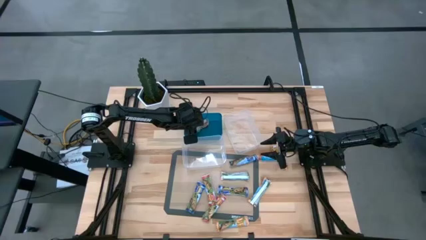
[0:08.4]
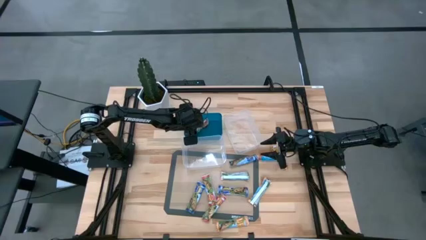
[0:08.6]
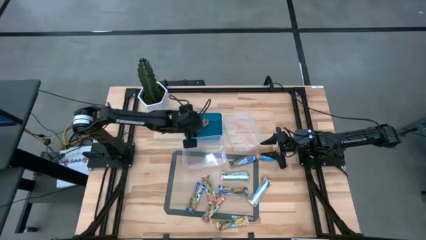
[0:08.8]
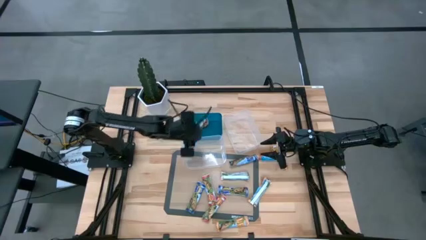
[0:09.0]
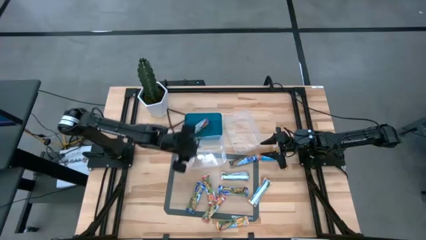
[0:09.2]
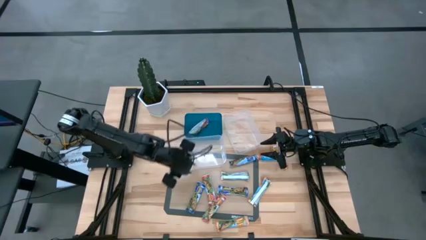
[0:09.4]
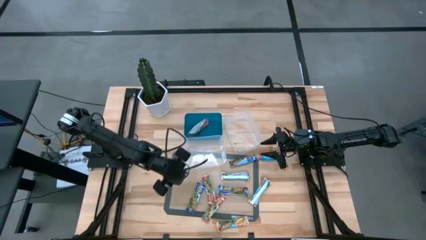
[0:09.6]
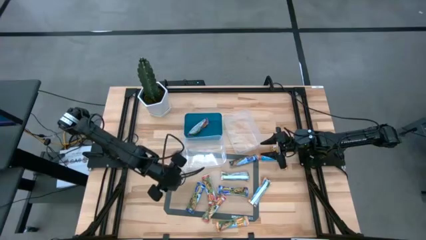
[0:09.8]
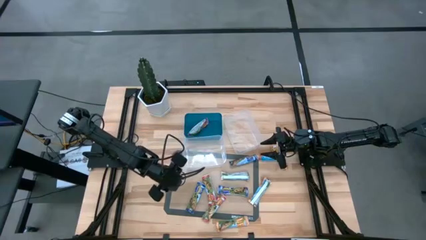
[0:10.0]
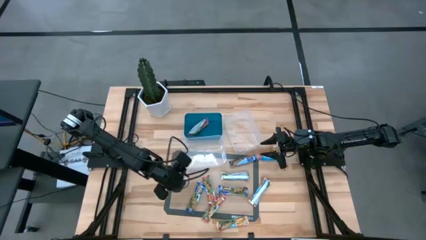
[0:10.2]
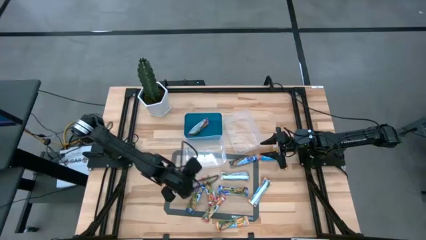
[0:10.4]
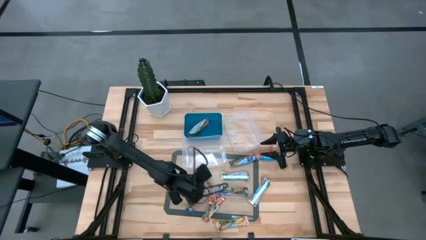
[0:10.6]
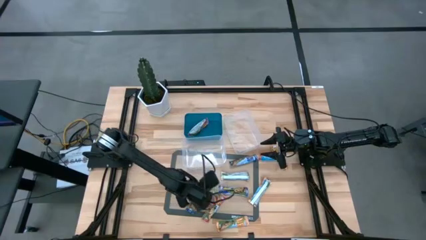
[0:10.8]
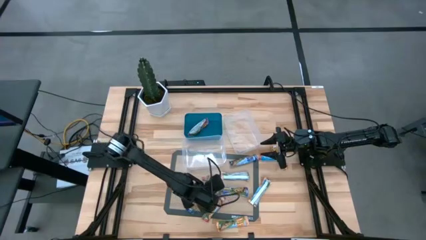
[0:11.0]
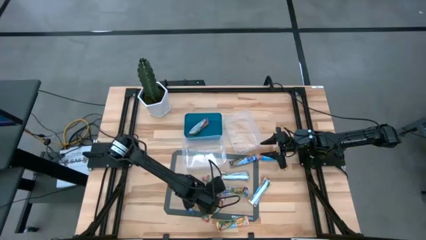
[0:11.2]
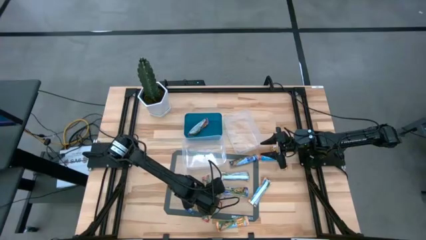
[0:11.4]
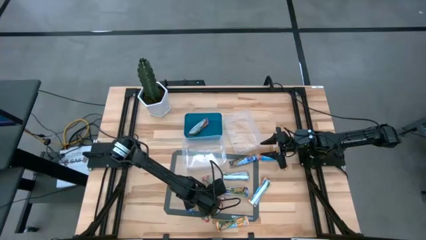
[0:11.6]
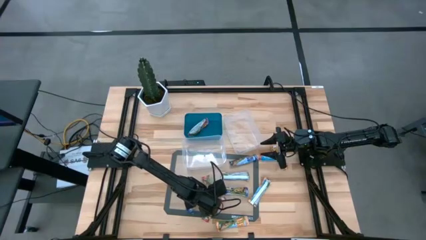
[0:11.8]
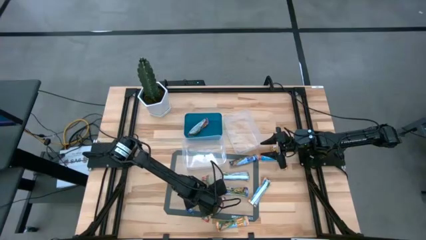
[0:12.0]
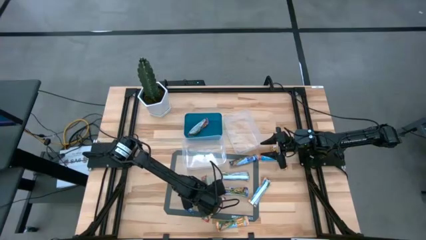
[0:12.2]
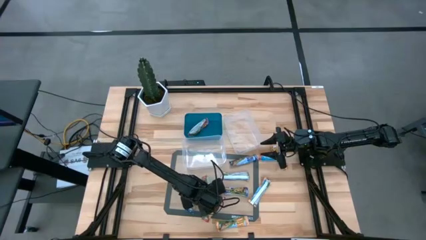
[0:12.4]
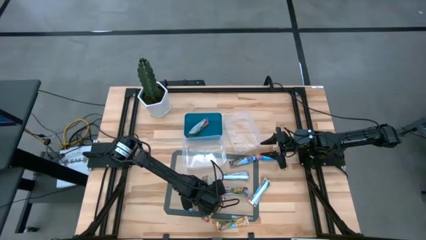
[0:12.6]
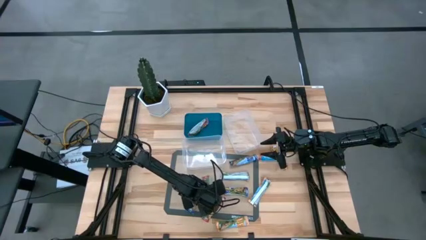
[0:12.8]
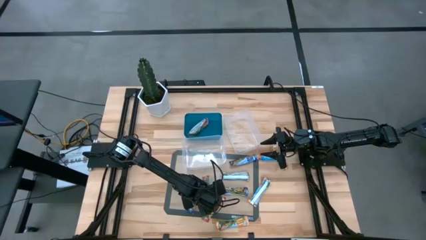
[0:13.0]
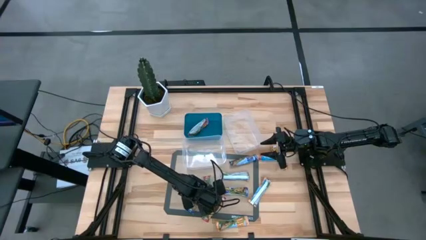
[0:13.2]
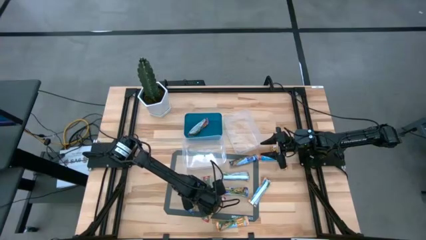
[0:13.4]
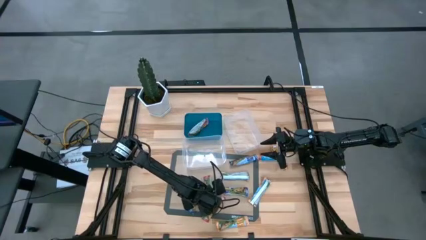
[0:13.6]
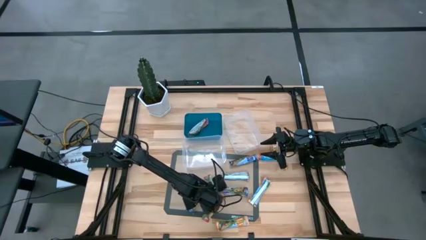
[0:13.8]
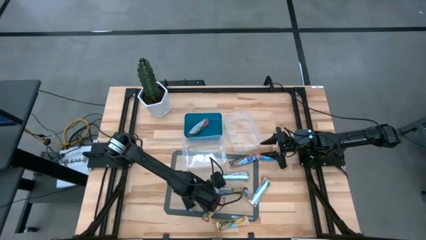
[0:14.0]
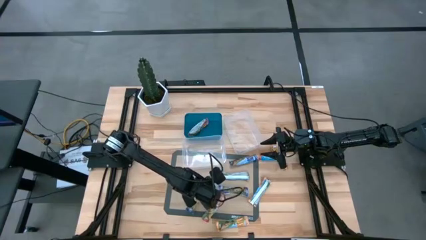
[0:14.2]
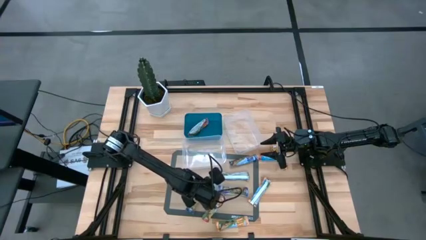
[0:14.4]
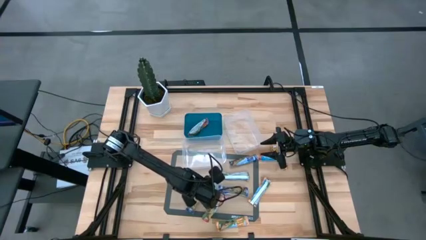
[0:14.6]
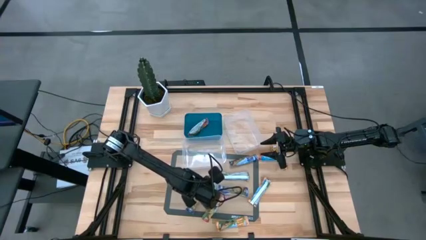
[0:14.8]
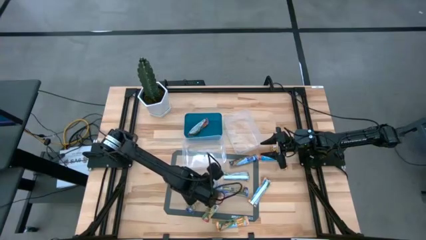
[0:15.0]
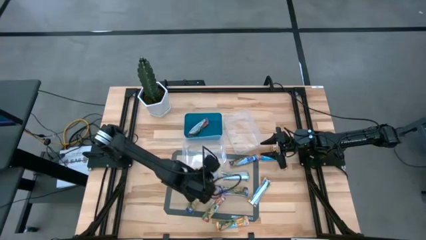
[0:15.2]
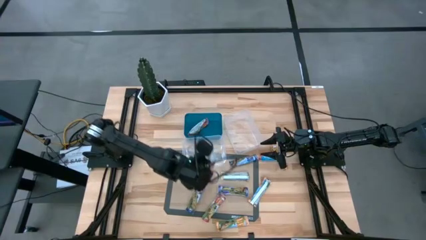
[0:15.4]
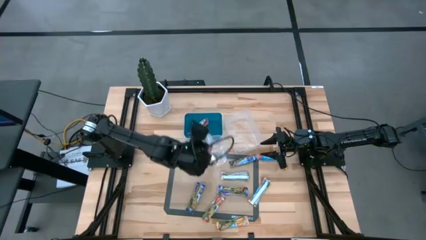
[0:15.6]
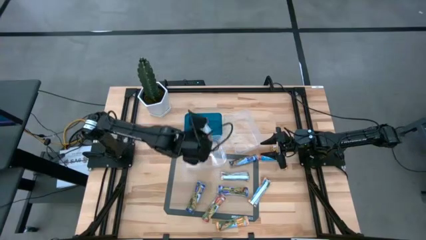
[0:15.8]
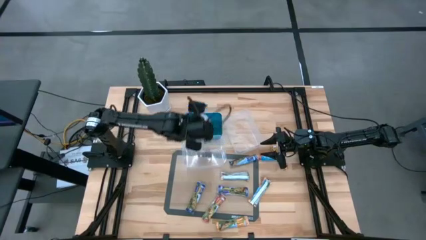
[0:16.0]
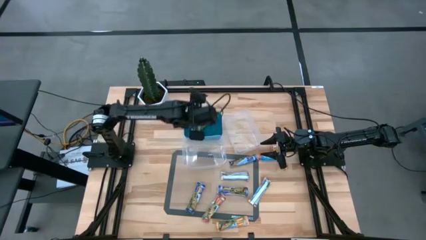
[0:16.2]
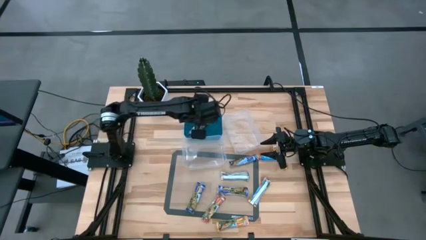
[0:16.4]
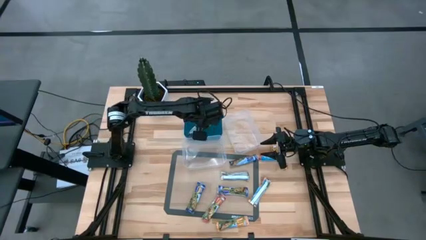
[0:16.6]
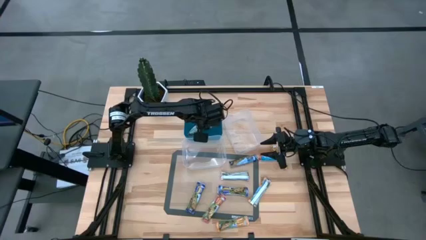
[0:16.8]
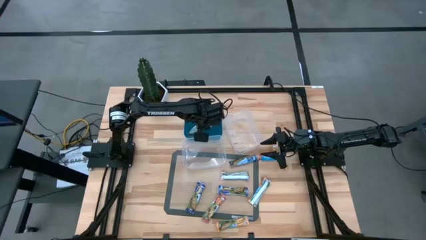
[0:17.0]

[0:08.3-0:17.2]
Task: Pick and place Granola Bars by type
Put the red granola bar into the blue bin

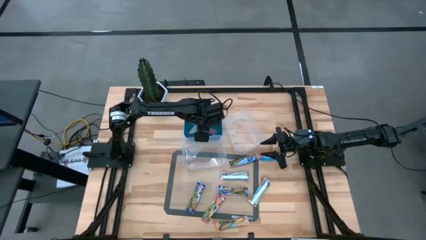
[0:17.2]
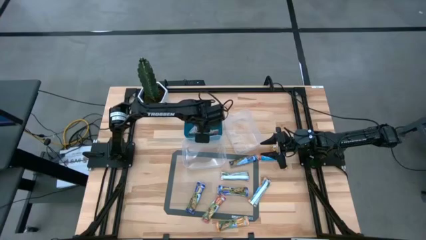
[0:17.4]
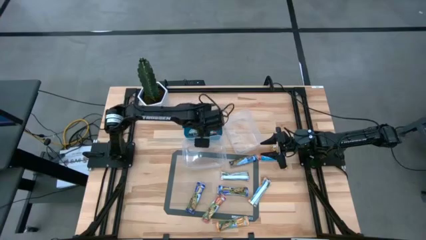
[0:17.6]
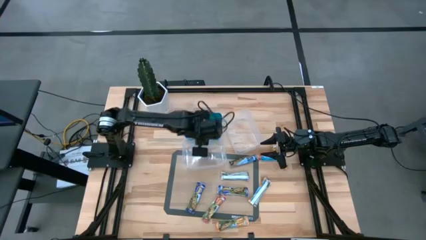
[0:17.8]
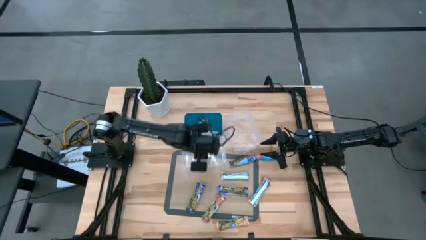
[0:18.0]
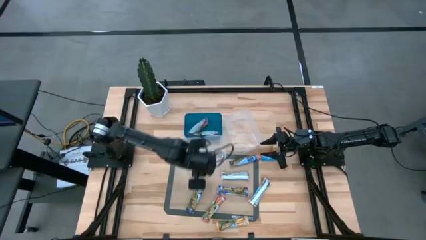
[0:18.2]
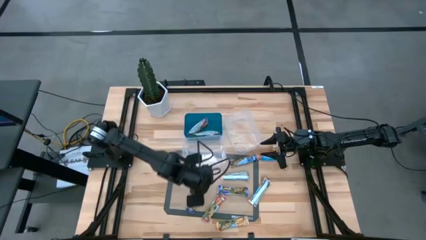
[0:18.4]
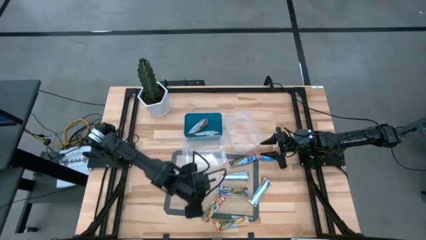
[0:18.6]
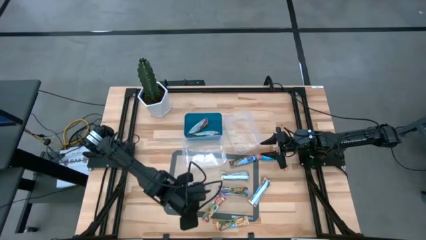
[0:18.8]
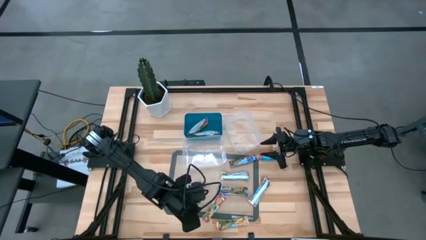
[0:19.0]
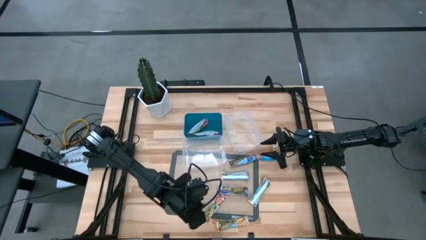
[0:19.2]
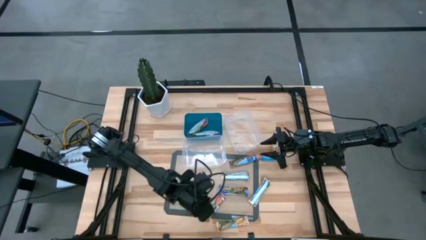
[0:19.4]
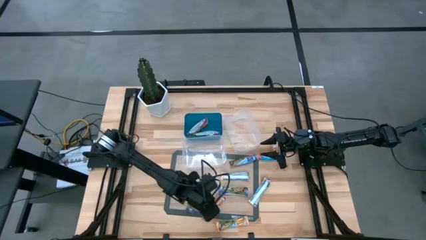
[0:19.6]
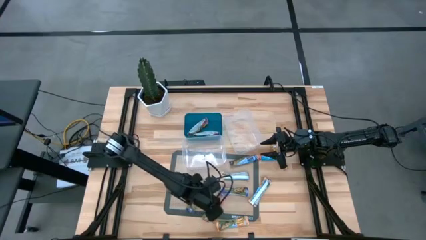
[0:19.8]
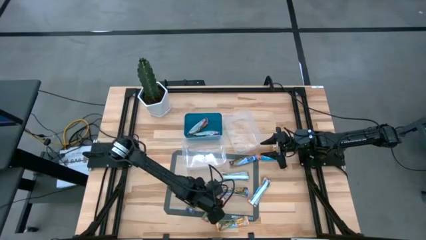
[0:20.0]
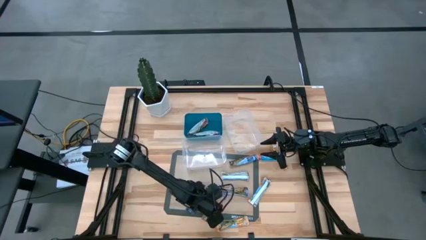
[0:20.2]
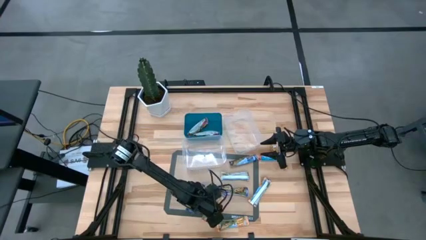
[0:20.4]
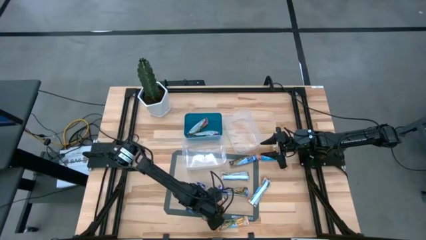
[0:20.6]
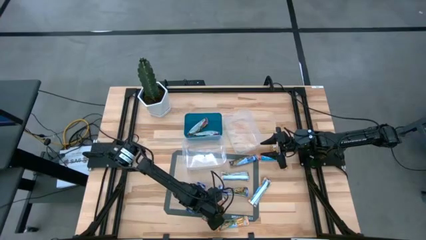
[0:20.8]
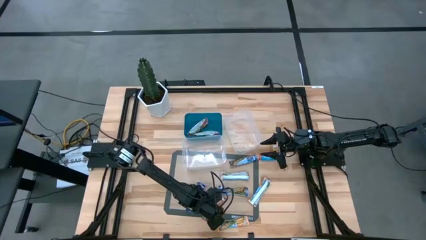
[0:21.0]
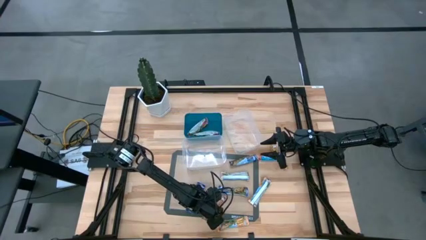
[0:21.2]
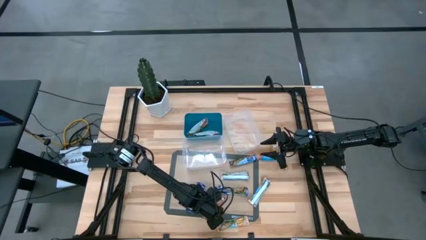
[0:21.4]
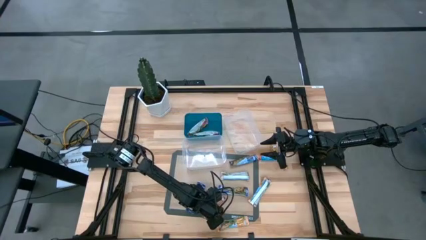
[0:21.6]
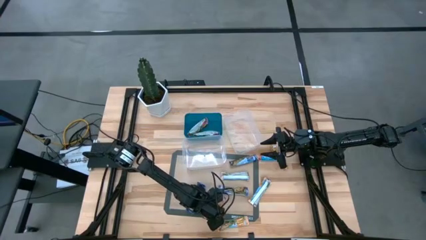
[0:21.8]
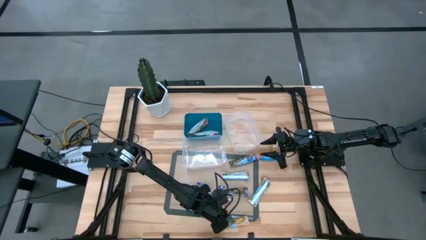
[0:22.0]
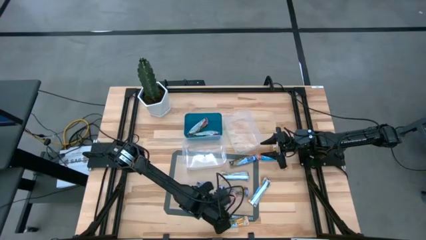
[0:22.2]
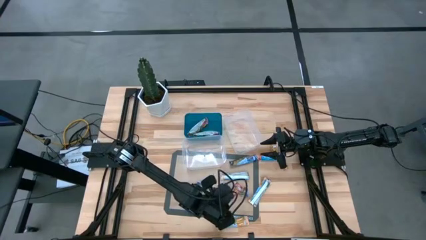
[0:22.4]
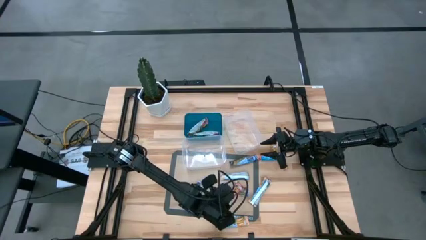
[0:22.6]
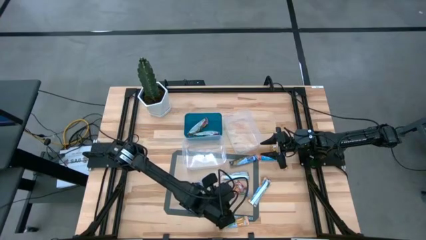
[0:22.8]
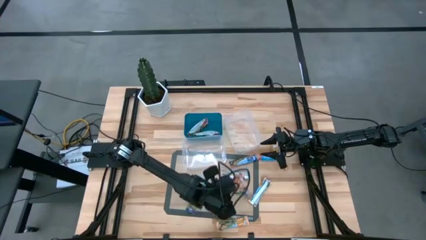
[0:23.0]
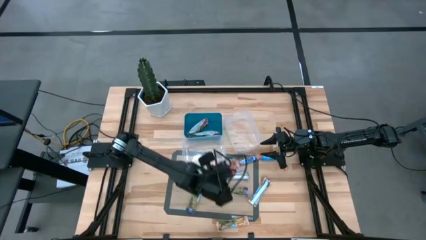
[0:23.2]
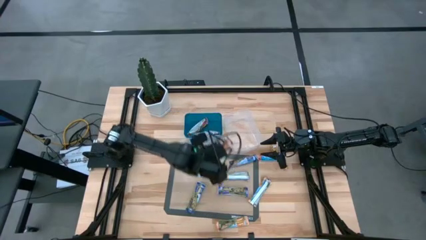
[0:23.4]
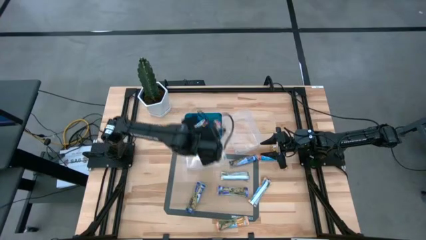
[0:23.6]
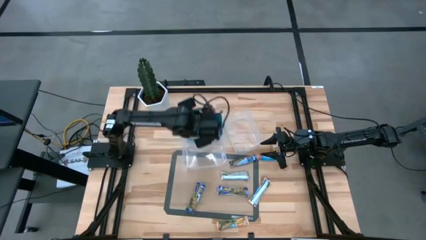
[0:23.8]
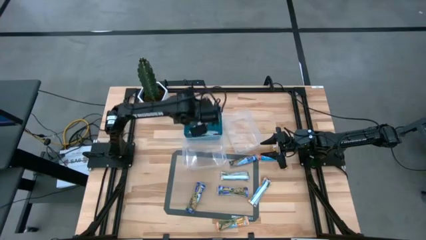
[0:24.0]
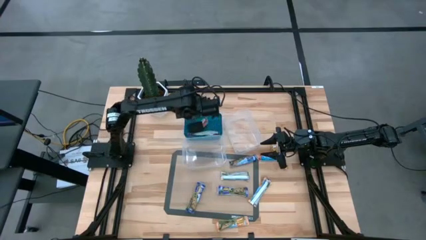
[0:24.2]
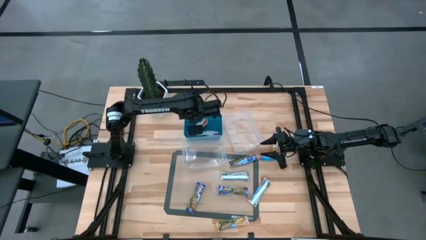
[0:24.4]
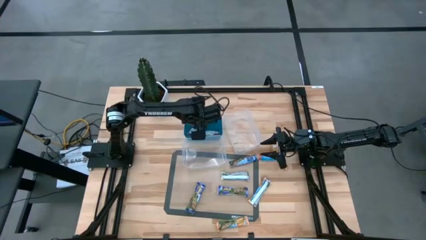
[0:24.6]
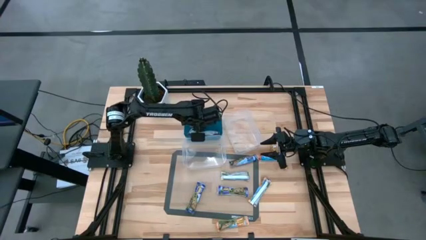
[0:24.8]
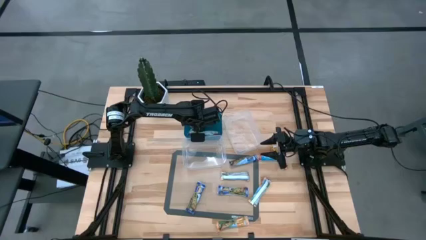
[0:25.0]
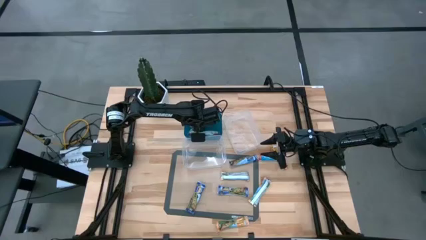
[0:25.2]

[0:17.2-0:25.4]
Put the red granola bar into the blue bin
